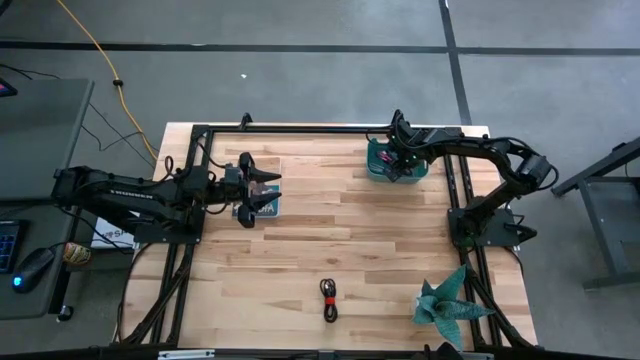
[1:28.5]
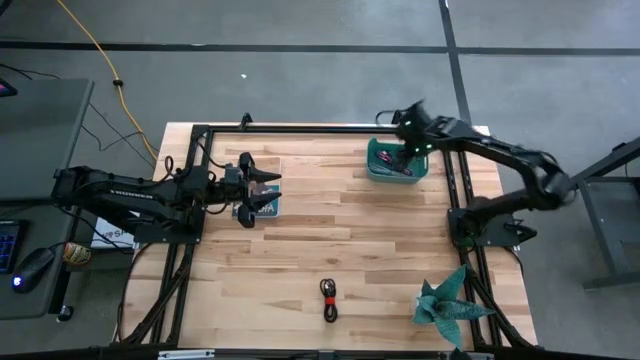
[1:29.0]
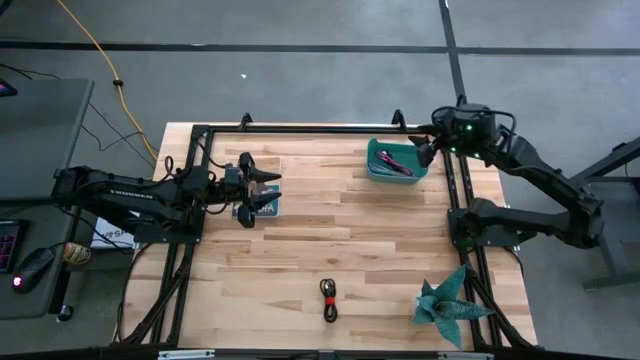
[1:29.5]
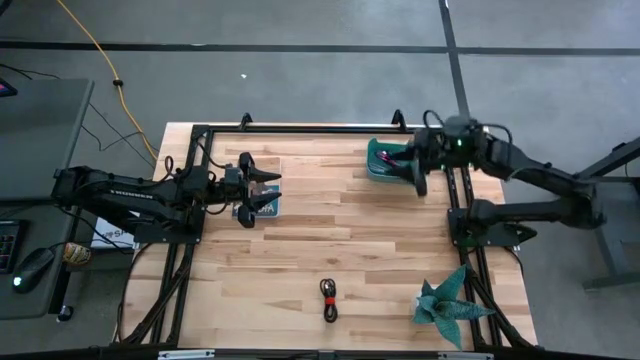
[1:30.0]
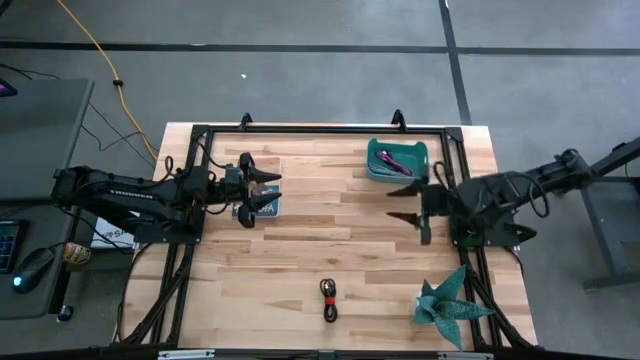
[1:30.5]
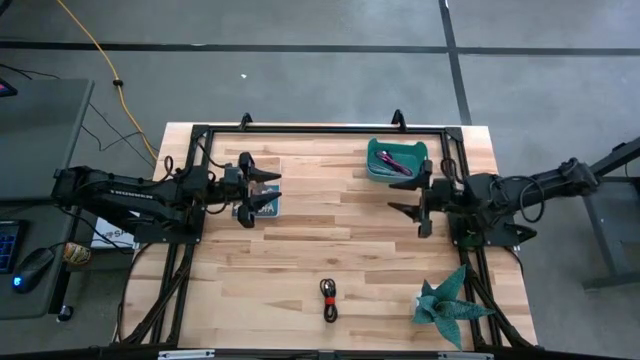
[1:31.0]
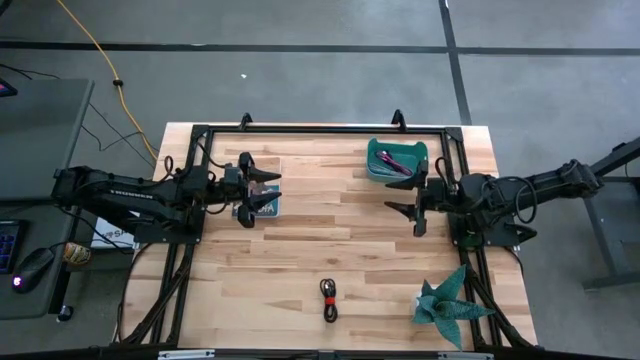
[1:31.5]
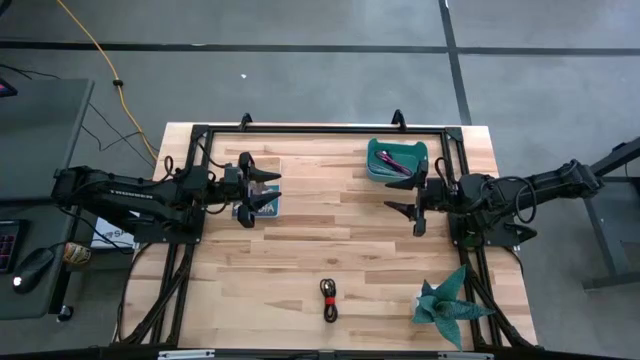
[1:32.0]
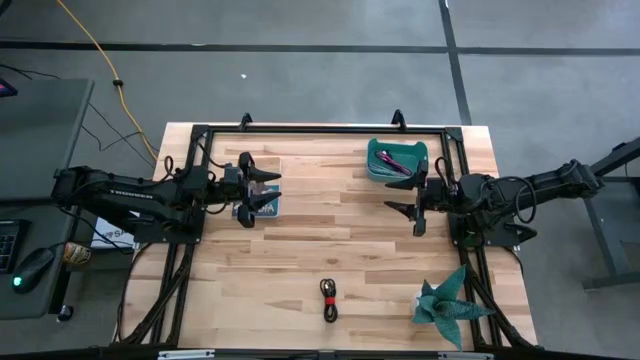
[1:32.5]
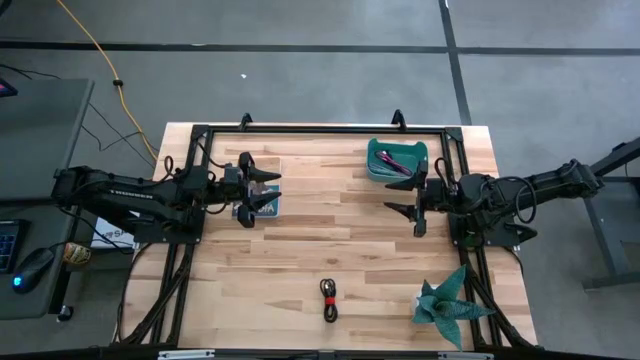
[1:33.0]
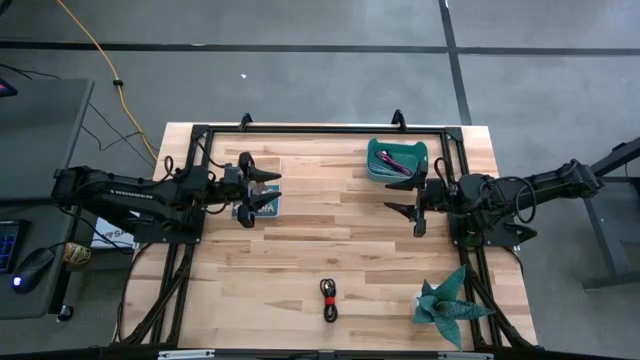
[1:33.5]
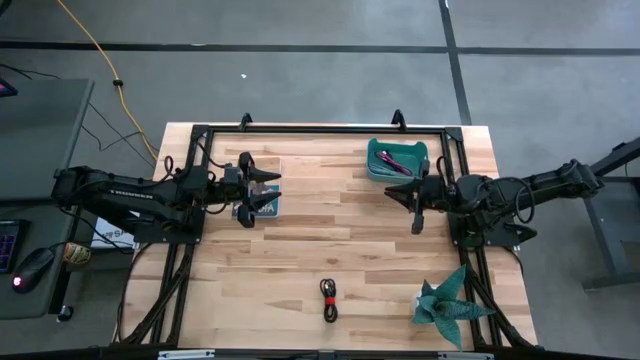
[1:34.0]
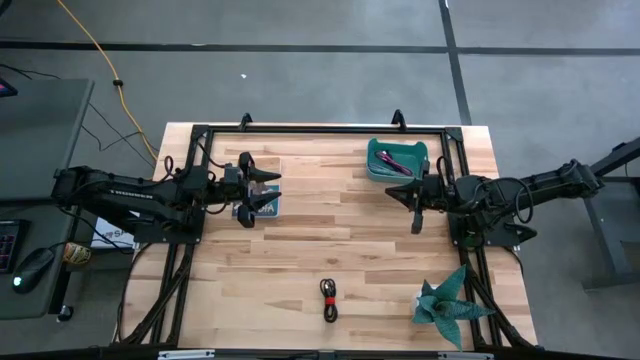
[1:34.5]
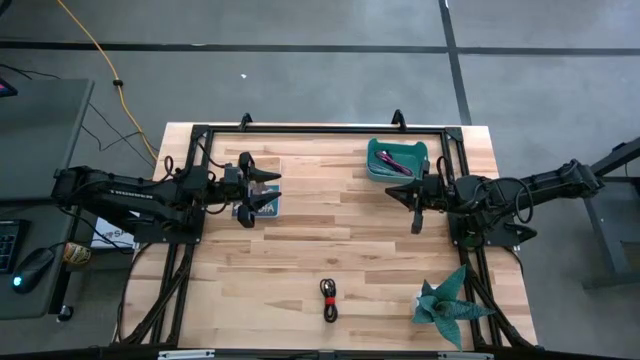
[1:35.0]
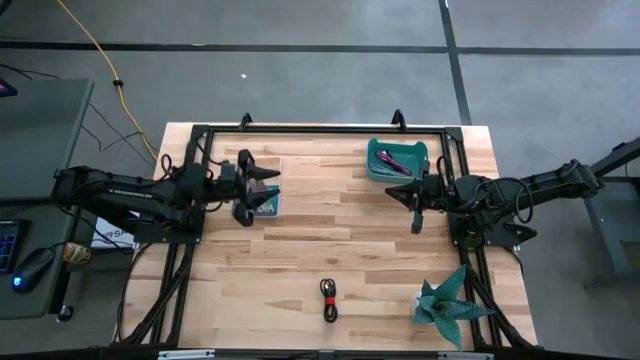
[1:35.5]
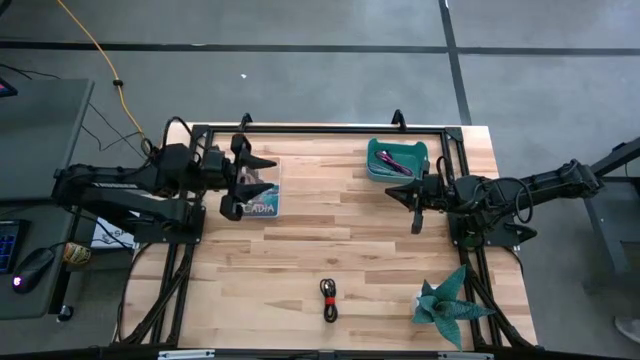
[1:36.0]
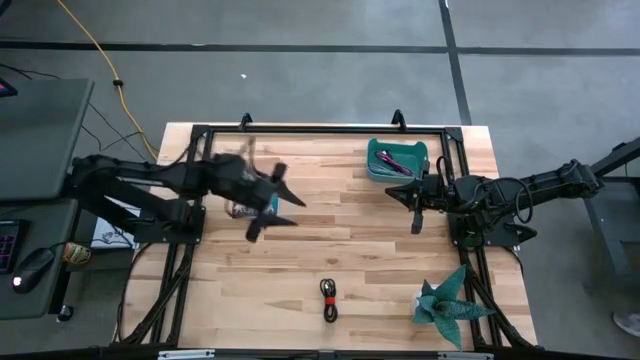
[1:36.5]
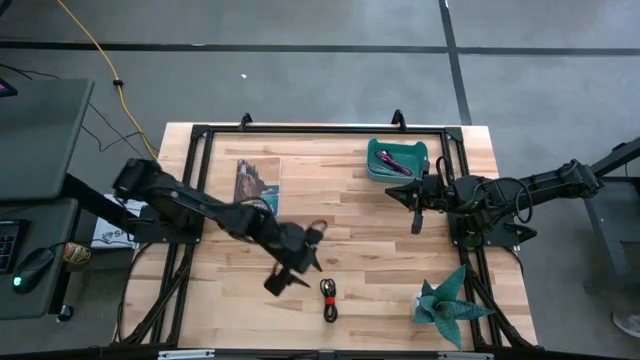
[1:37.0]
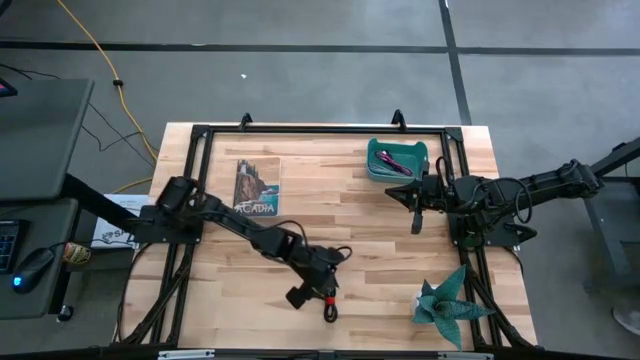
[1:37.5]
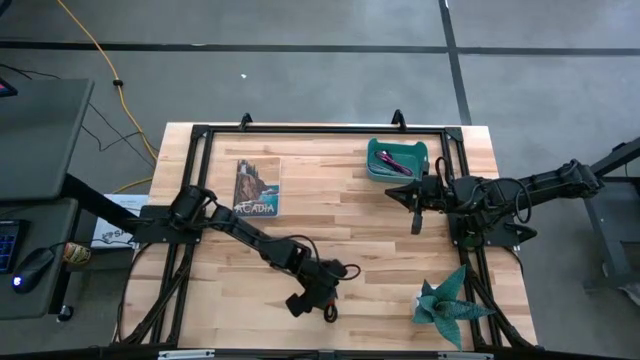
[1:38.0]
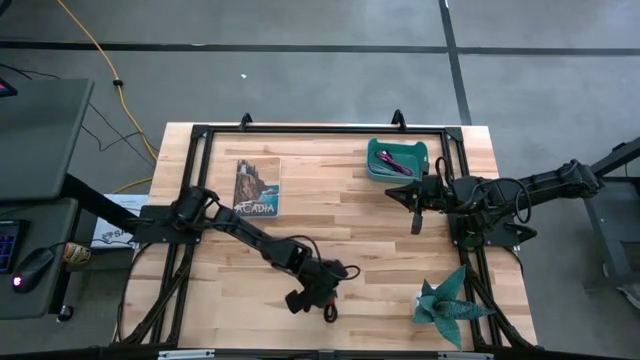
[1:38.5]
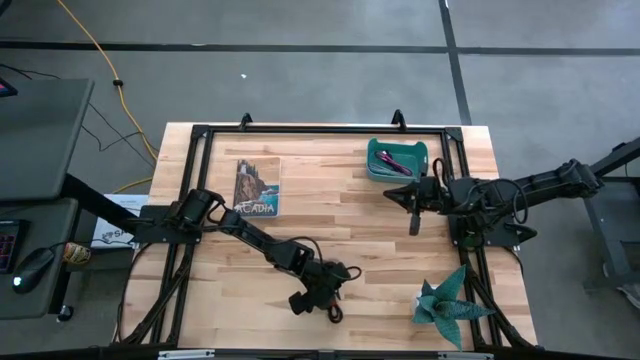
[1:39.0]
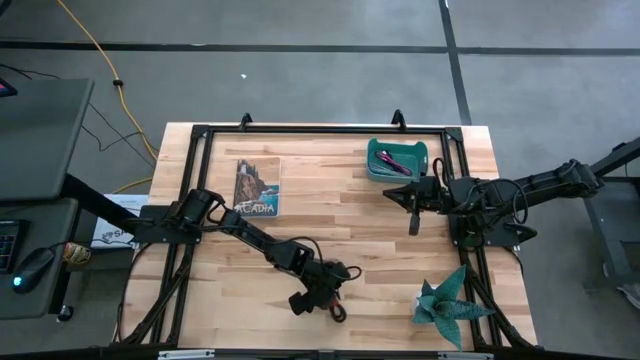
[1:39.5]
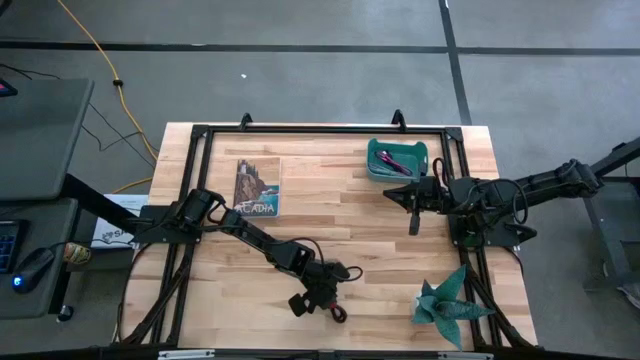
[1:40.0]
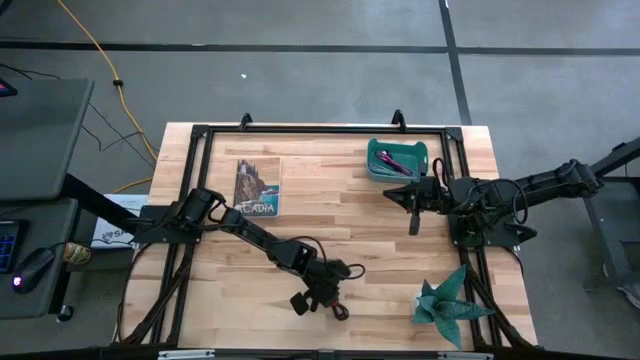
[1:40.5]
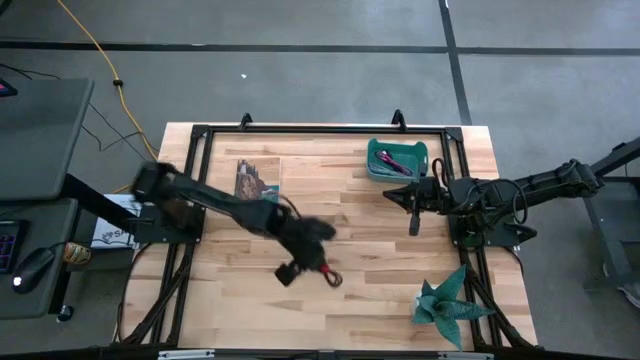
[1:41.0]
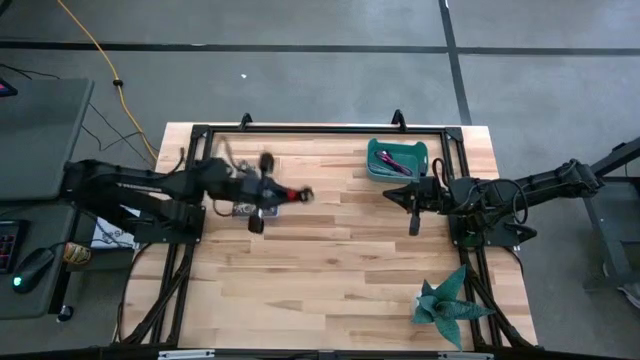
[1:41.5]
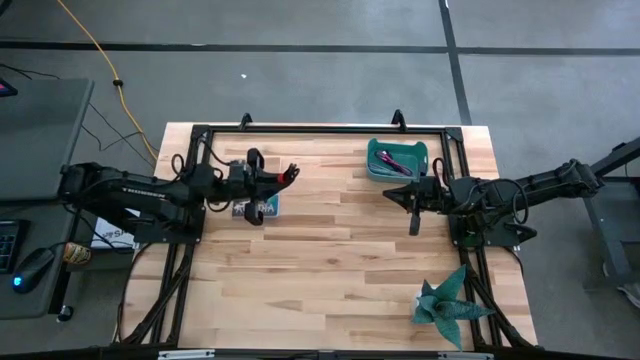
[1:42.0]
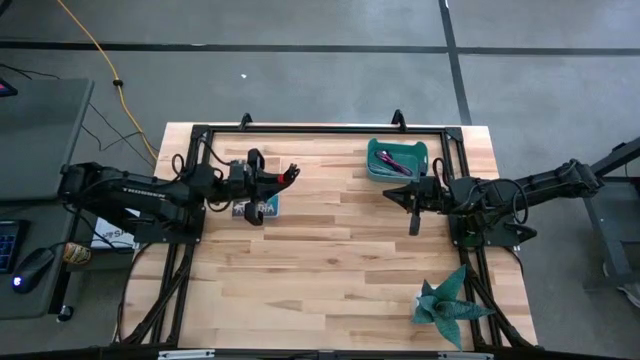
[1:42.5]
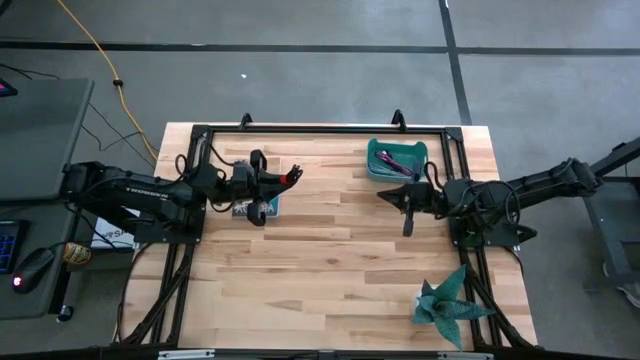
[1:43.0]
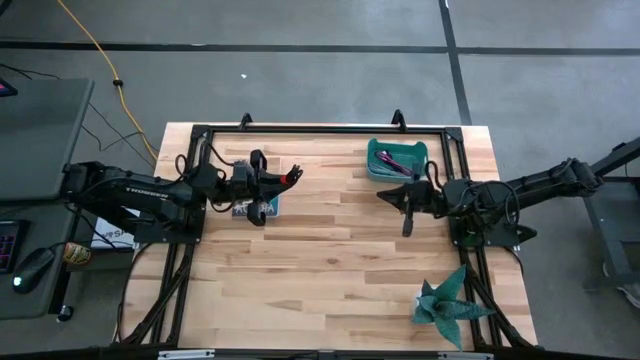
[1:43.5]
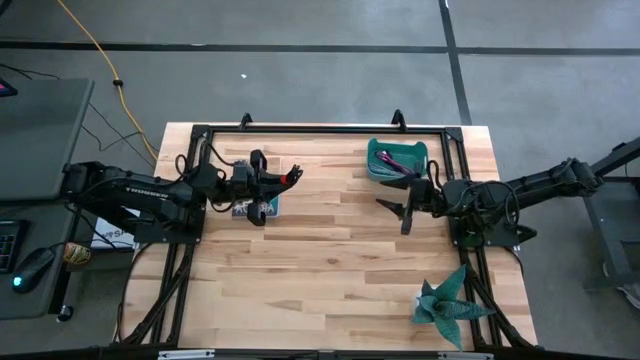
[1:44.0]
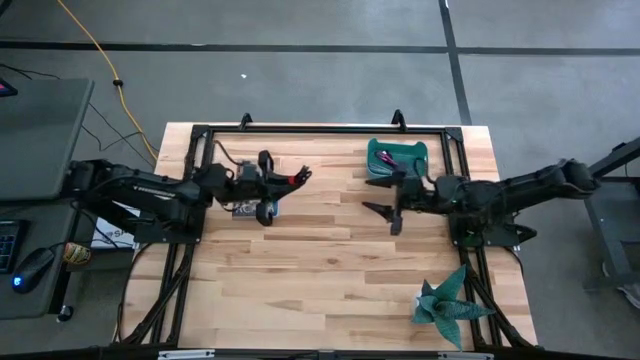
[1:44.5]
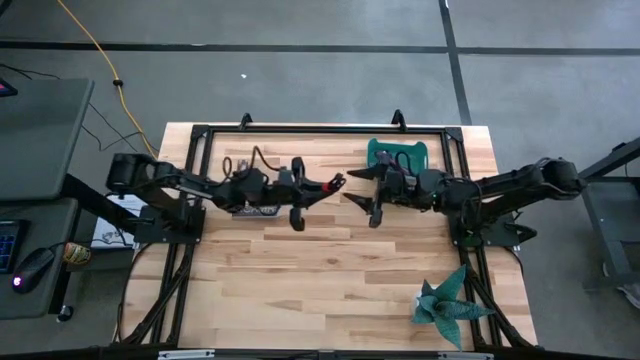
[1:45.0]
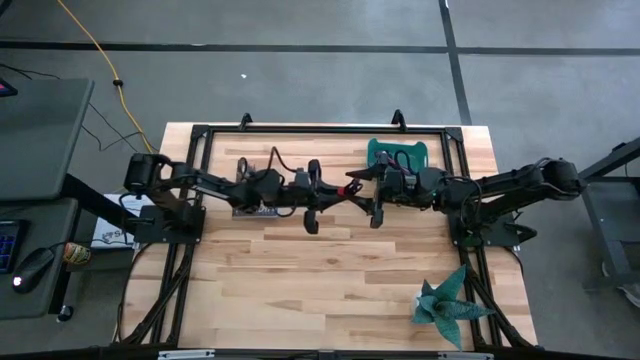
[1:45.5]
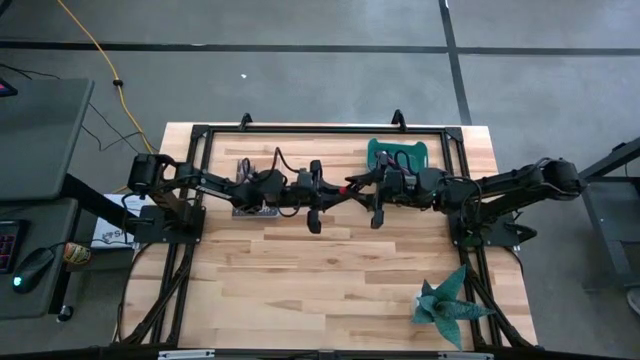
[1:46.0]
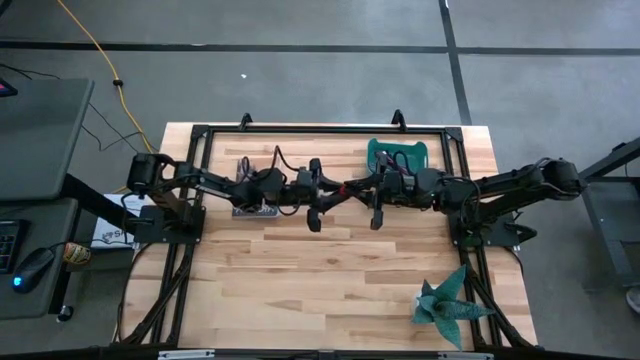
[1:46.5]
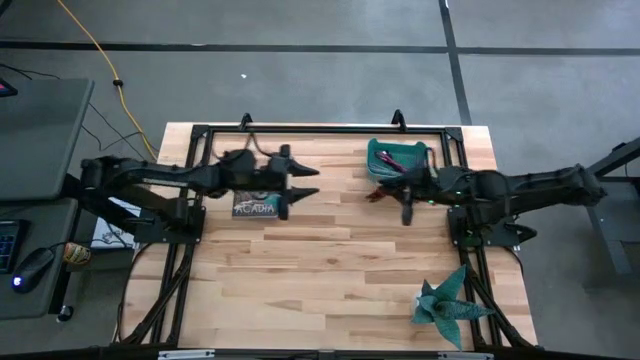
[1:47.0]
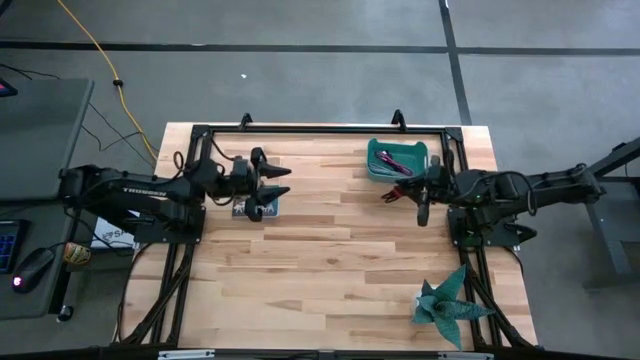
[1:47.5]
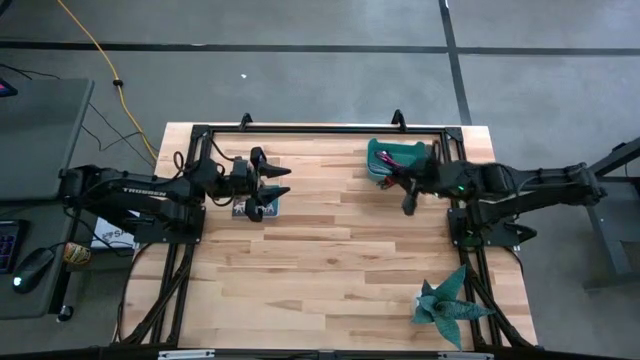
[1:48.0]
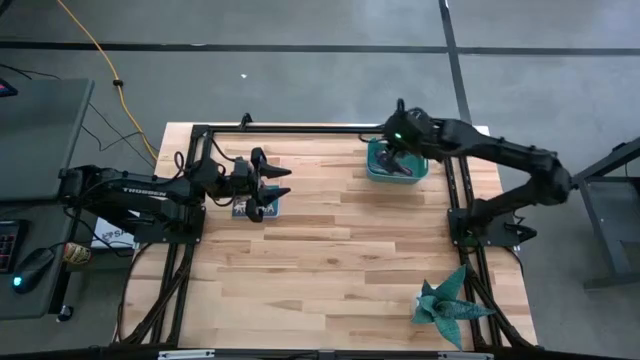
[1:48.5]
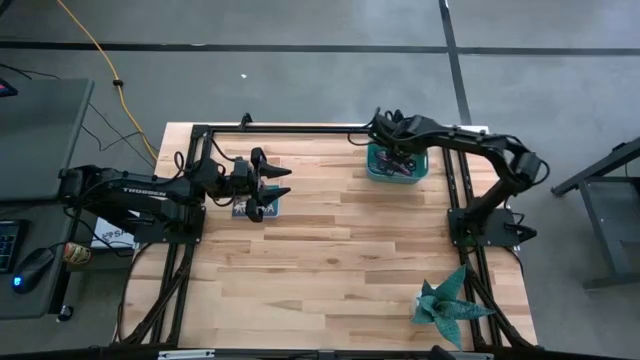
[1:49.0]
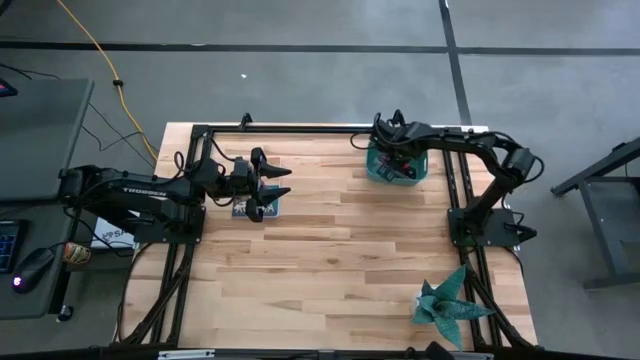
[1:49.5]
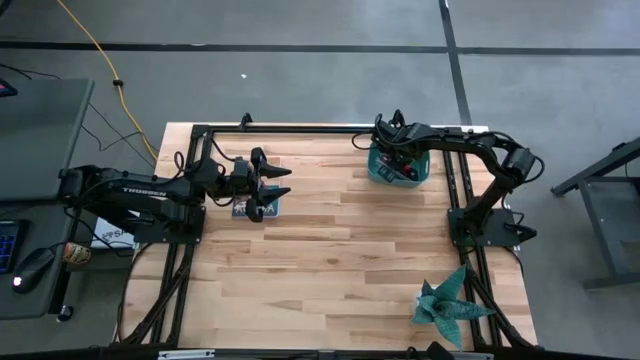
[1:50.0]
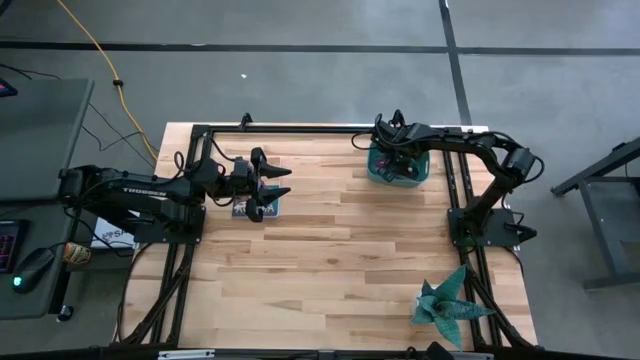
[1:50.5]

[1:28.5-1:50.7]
Task: Pick and place USB-C Cables
Put the black charger cable into the green bin
